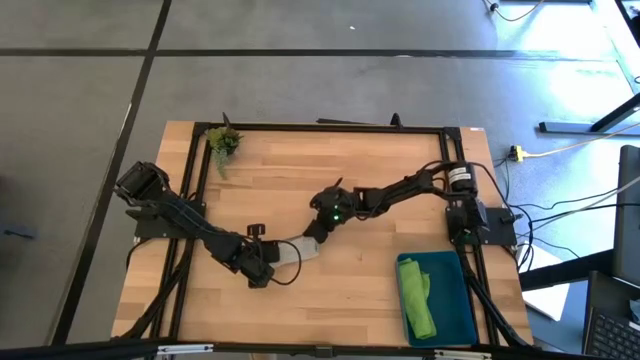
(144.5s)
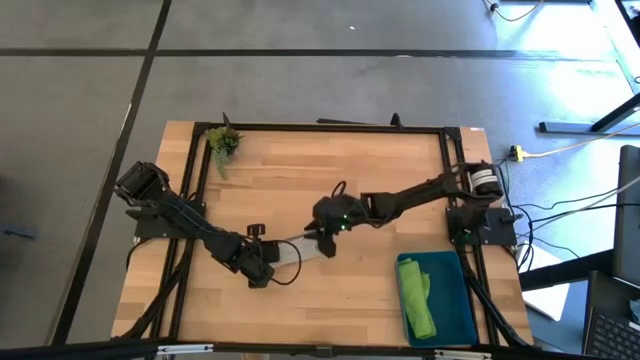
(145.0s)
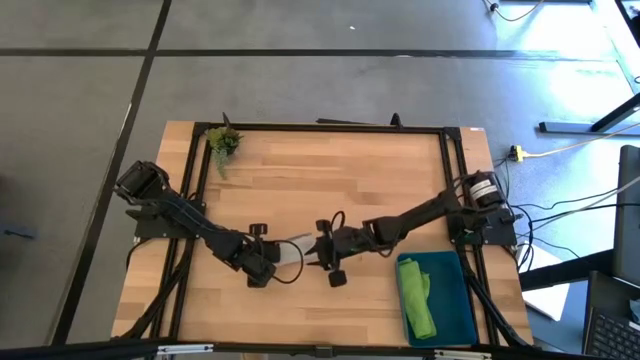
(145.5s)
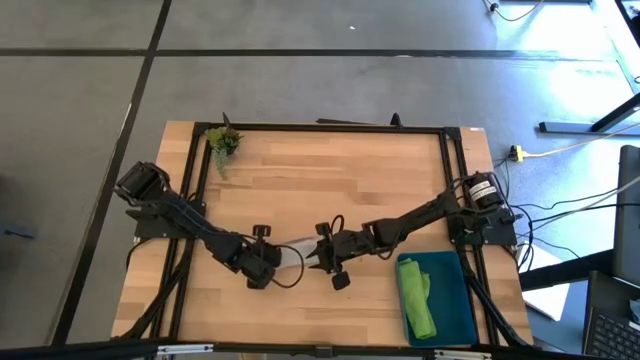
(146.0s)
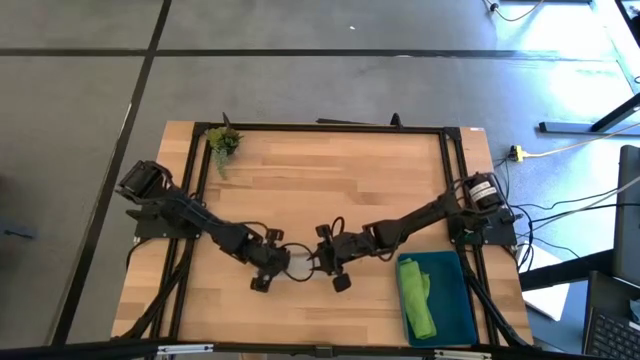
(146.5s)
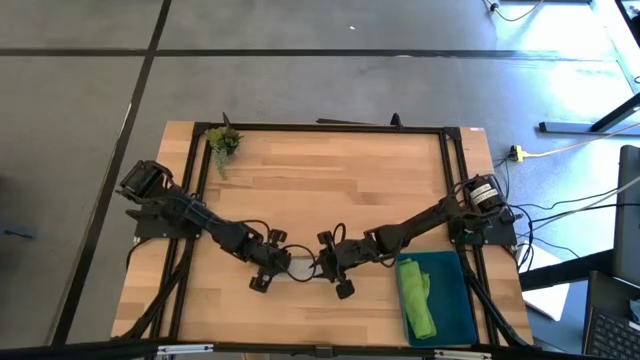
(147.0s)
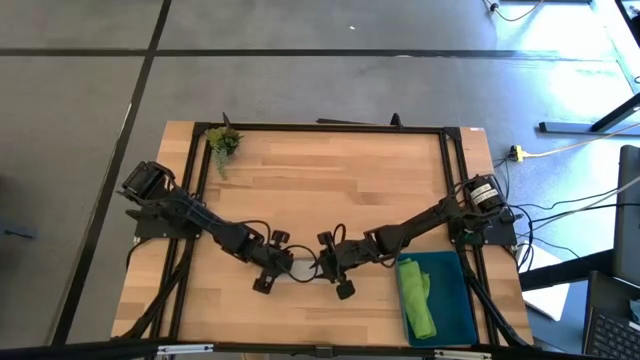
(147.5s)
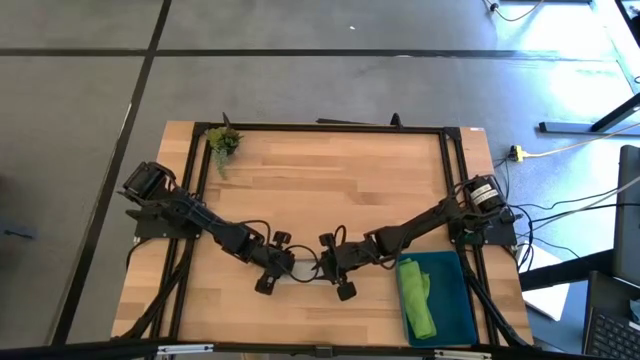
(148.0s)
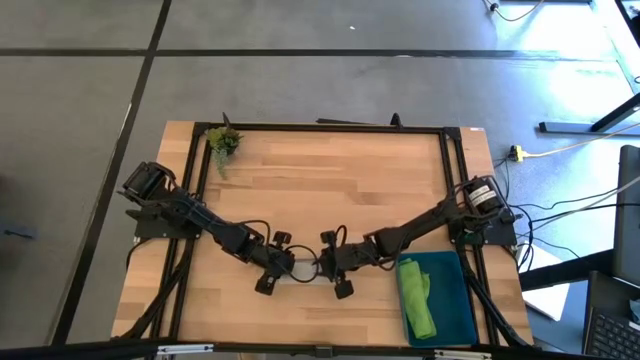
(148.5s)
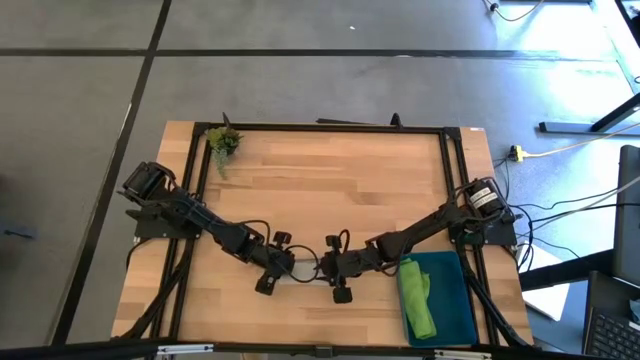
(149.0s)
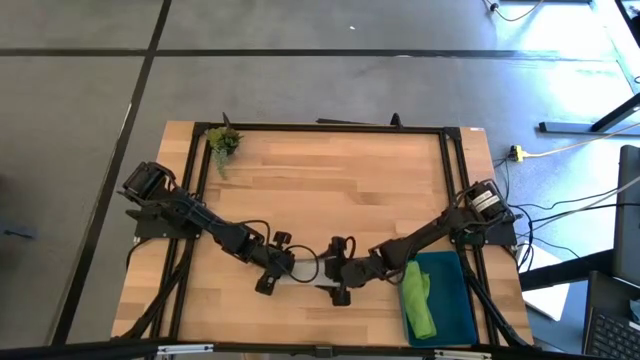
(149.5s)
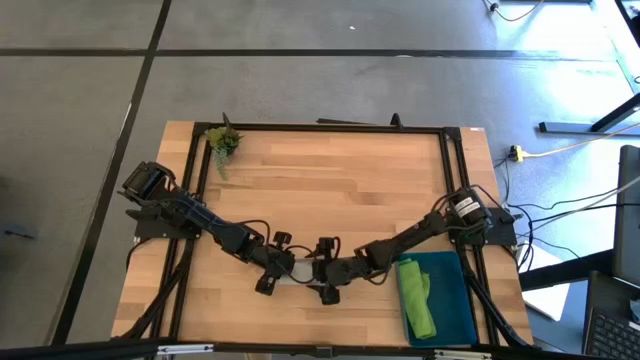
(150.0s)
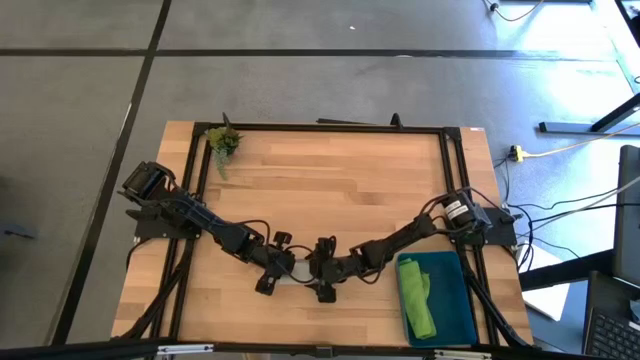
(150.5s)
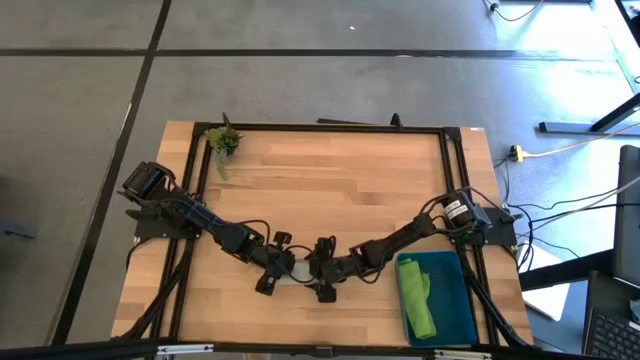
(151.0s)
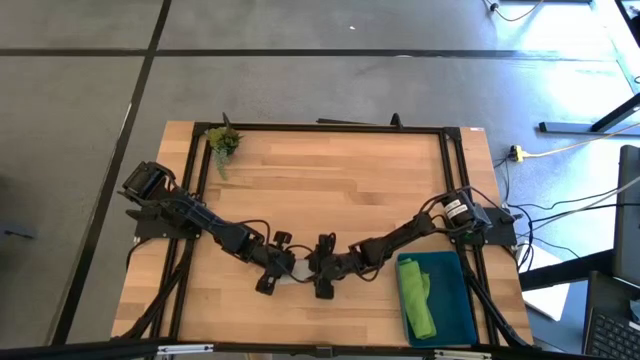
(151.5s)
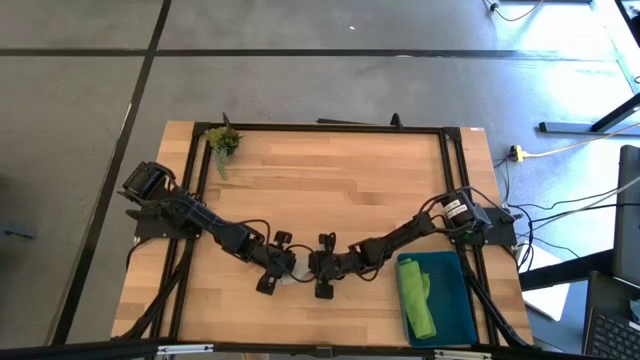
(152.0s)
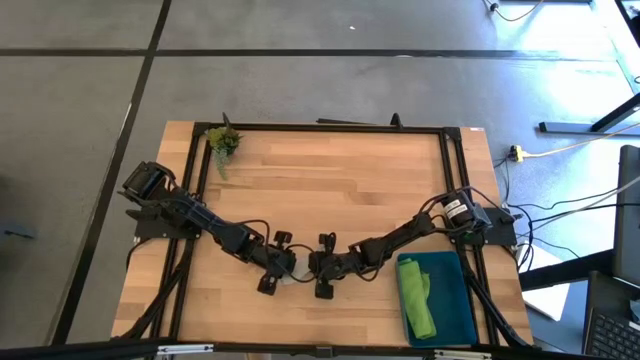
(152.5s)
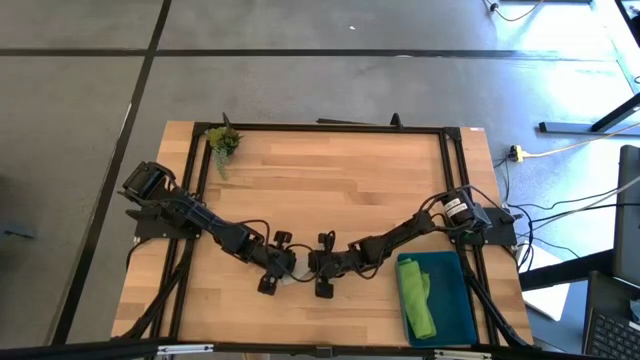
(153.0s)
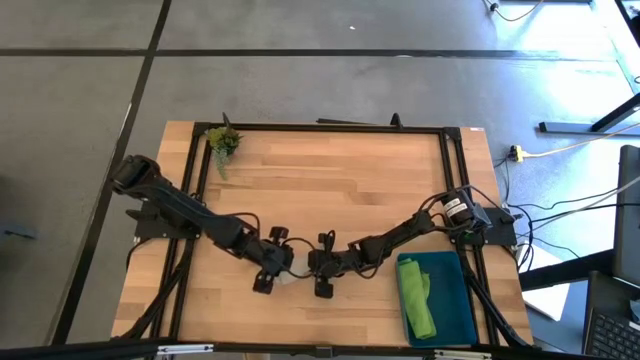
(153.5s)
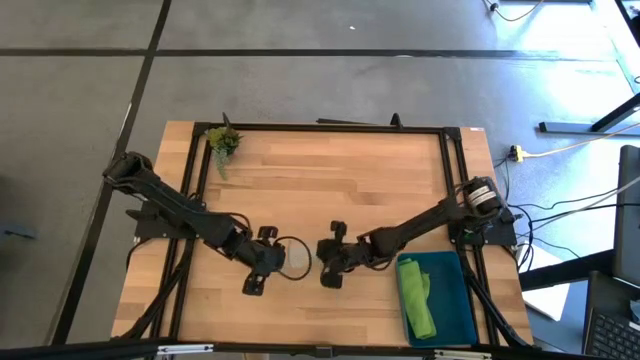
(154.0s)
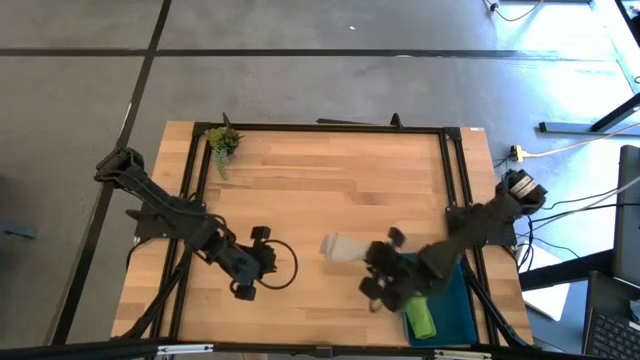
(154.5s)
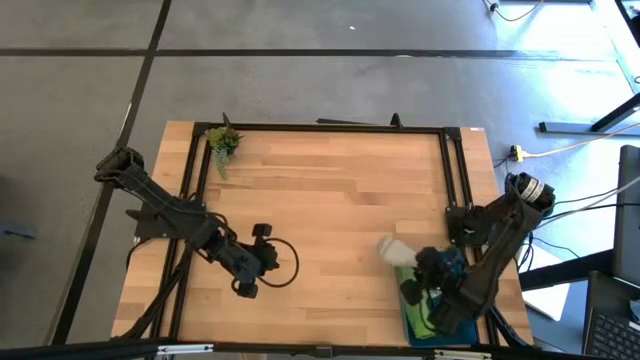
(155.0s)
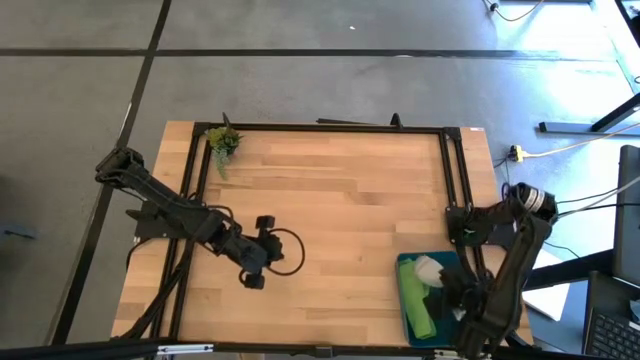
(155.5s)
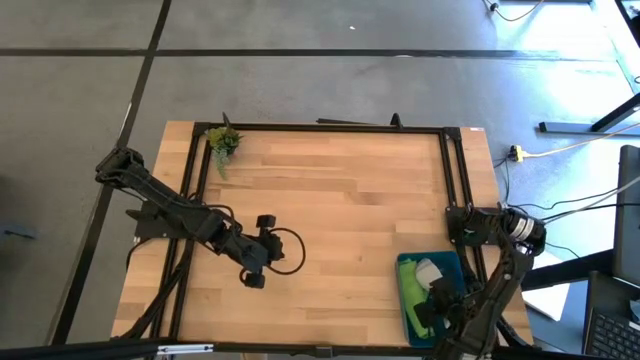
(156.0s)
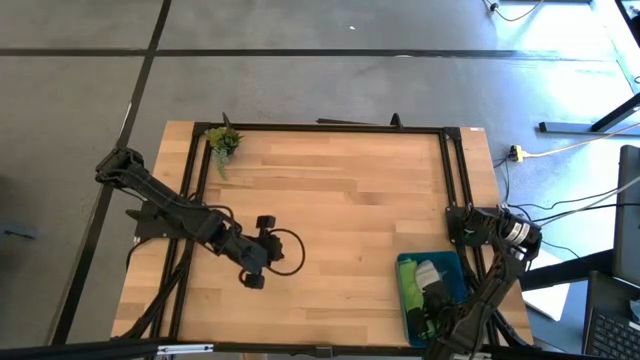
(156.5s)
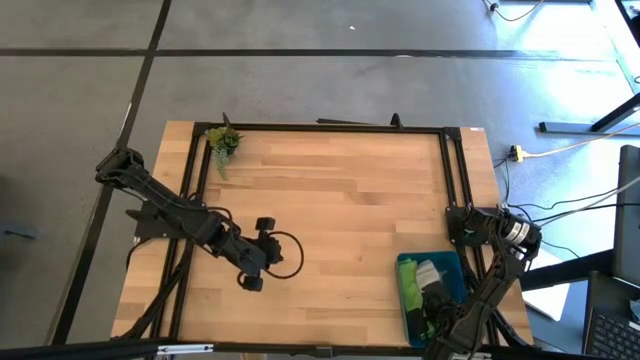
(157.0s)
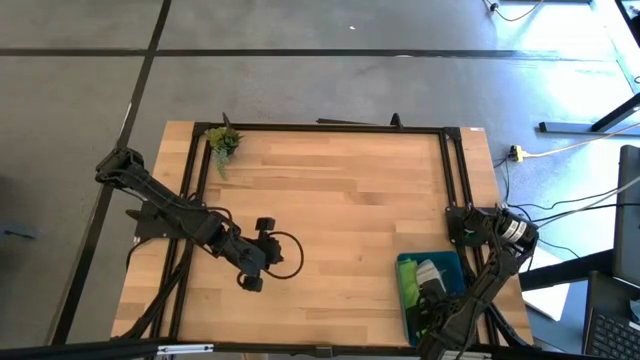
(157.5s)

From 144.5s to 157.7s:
Task: Roll microfiber towels into tight, uniform cylinder then place into a basket
Put the folded gray microfiber cloth into the bin

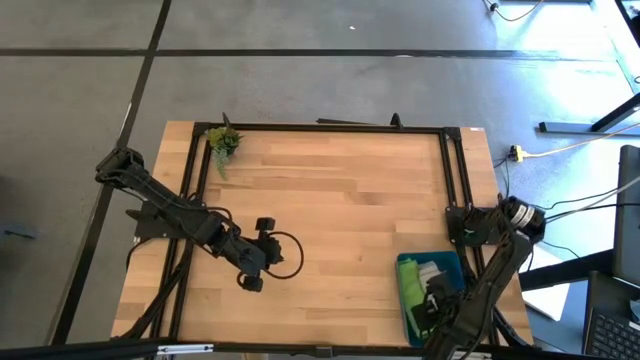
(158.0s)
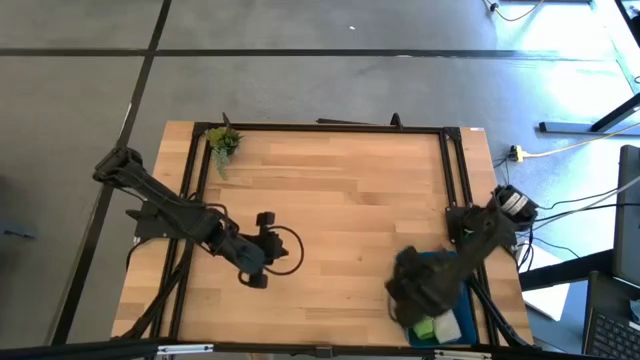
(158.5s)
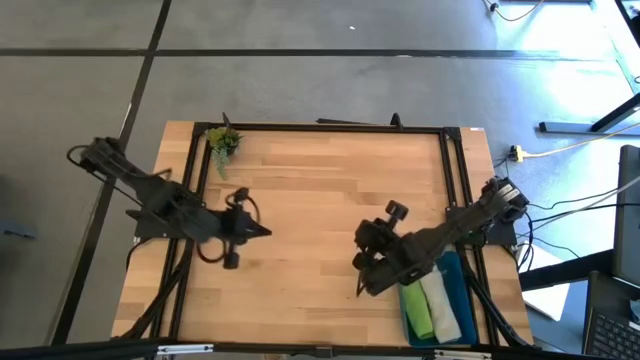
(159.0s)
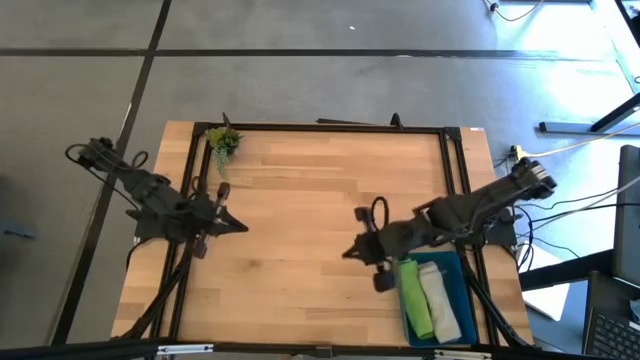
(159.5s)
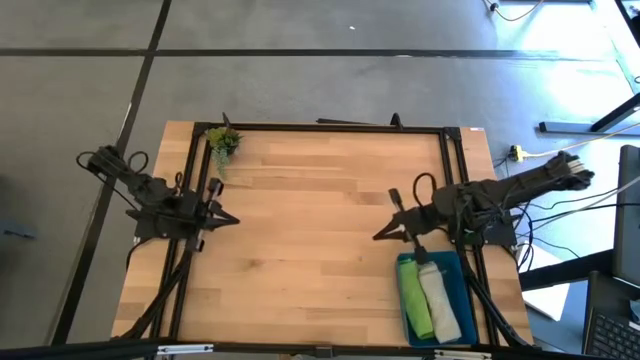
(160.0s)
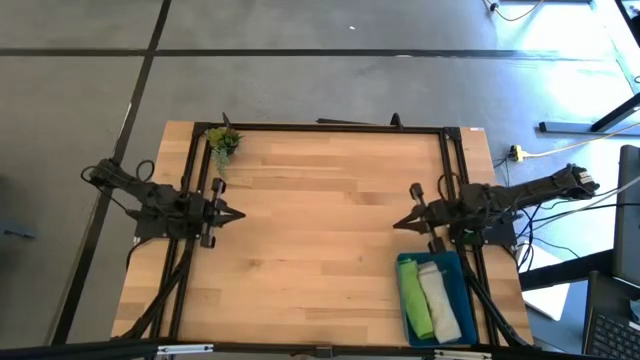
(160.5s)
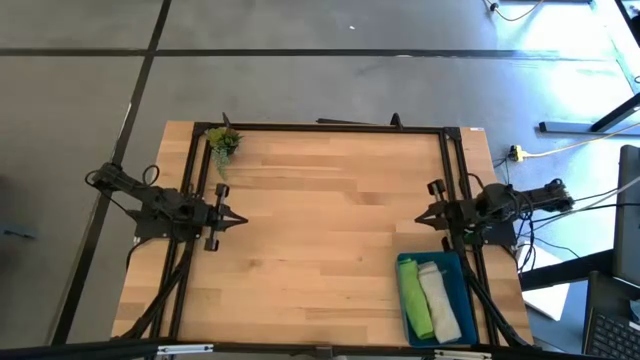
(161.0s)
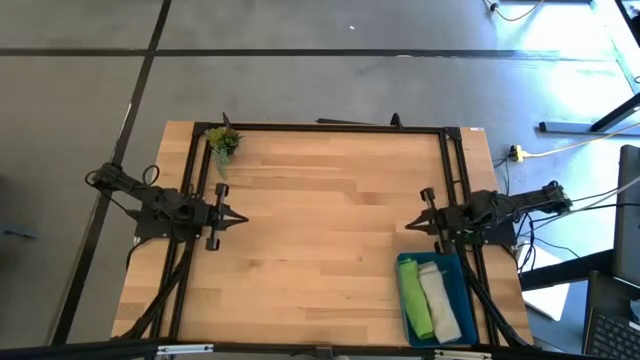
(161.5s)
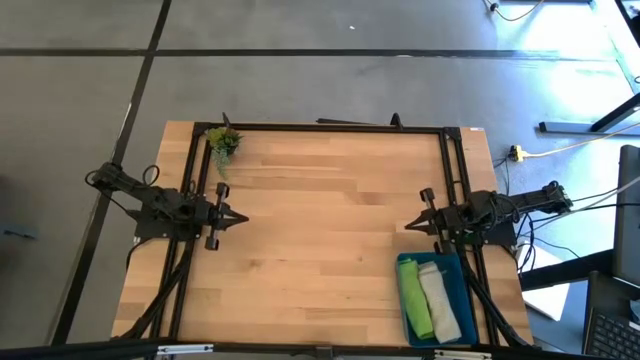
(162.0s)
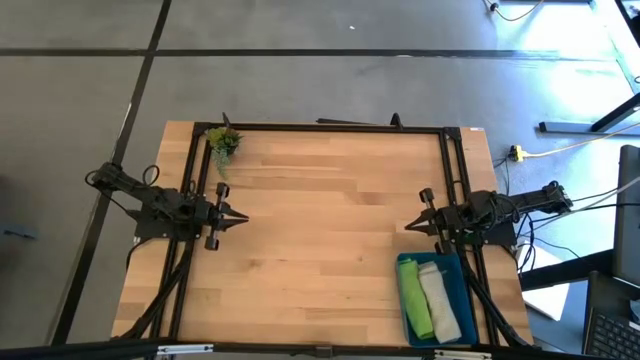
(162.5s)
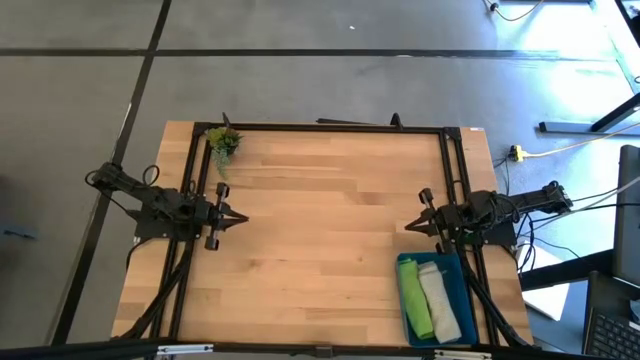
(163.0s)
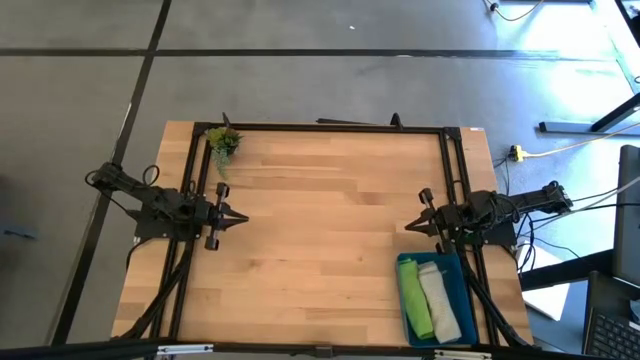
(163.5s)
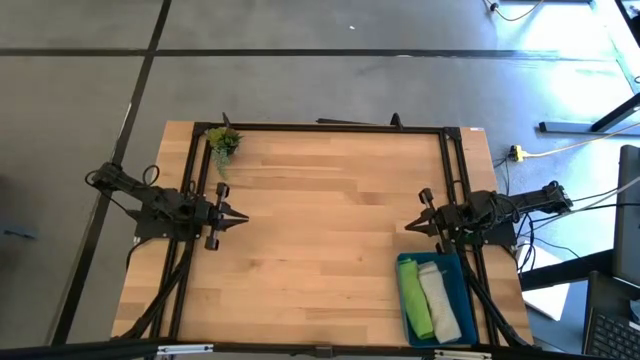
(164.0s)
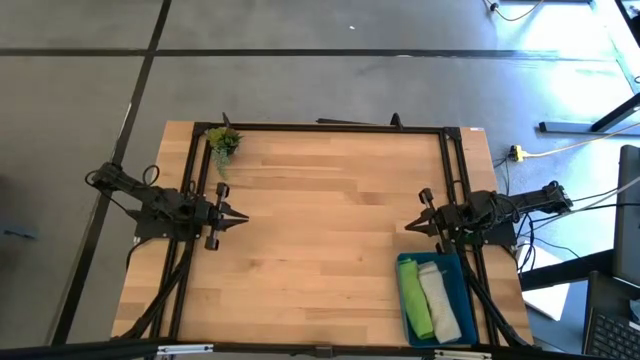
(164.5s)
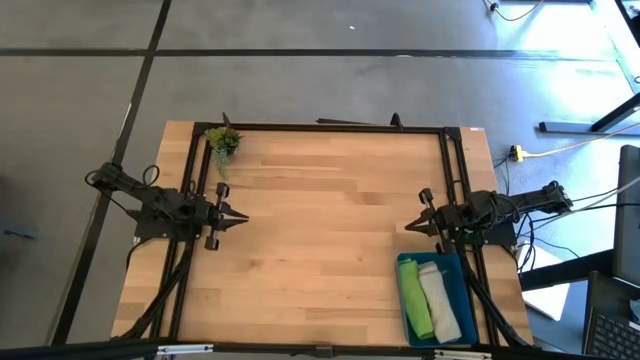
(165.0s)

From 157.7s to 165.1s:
Return to Home Position

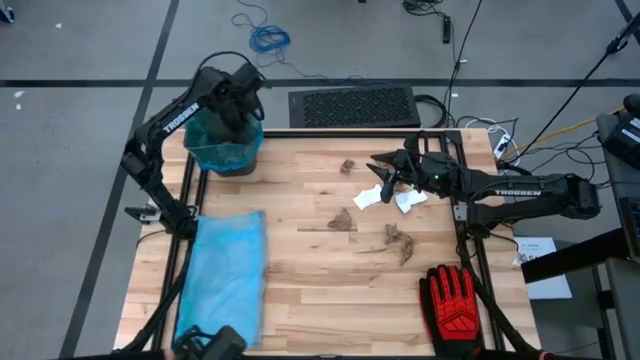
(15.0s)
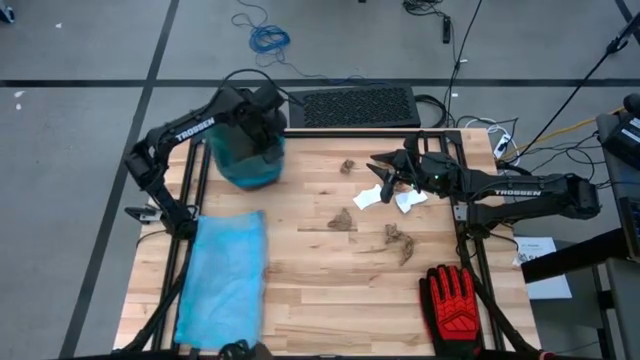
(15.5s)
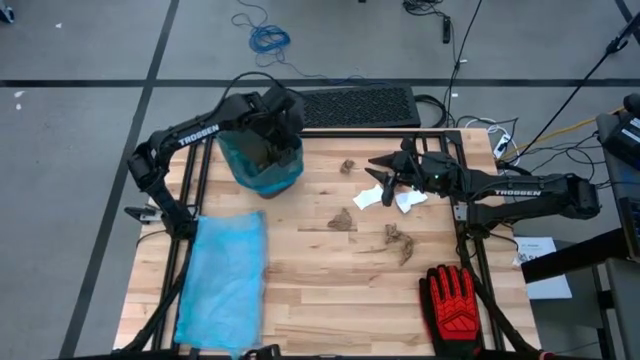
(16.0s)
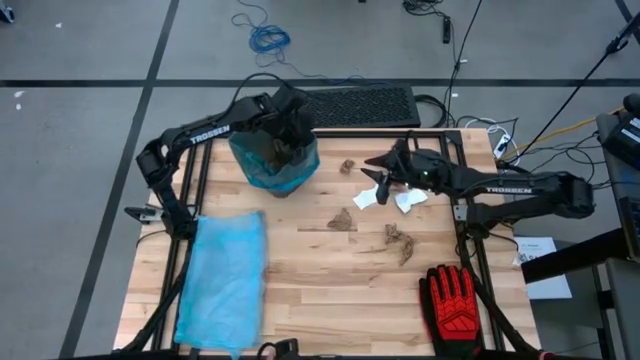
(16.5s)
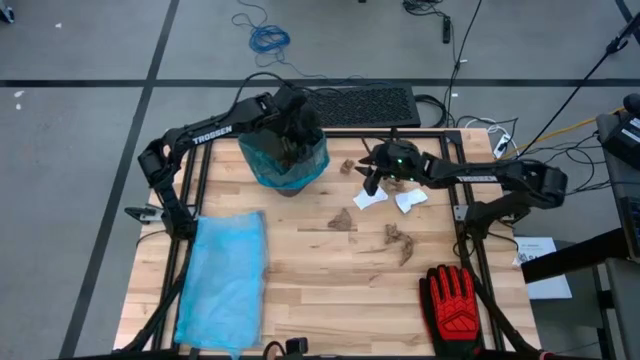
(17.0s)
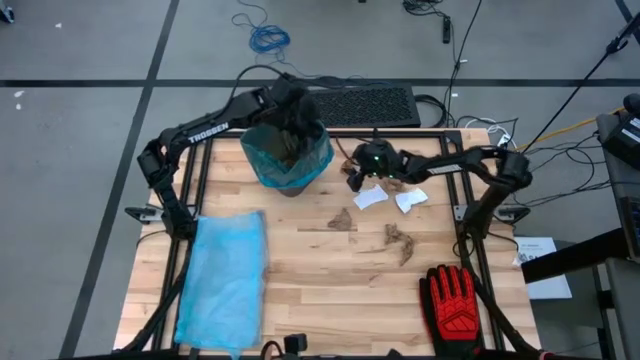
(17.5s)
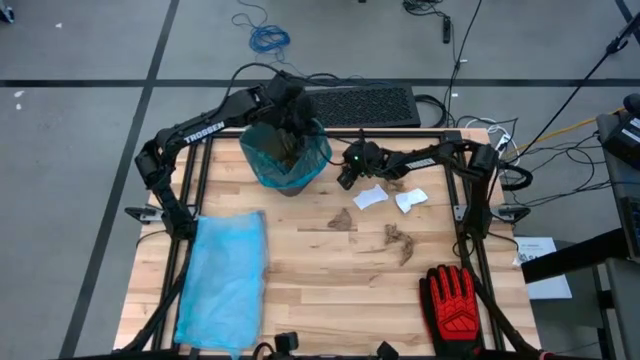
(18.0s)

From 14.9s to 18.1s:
Task: place trash/remove bag and relplace
Move the black trash bin to the top middle of the table
